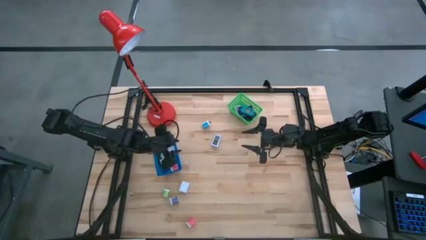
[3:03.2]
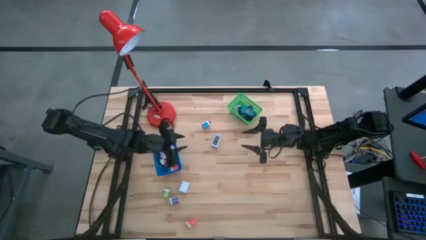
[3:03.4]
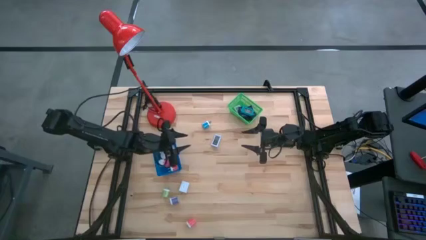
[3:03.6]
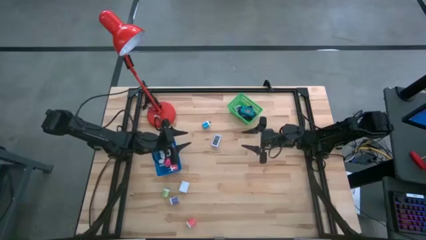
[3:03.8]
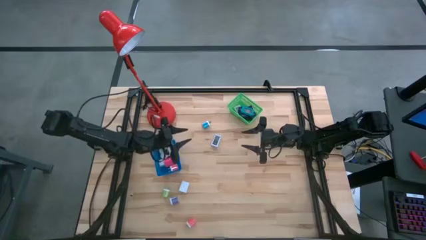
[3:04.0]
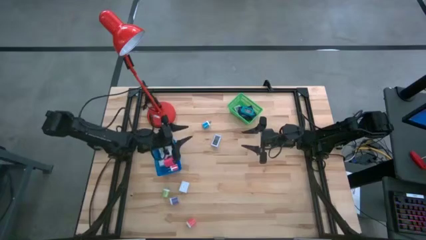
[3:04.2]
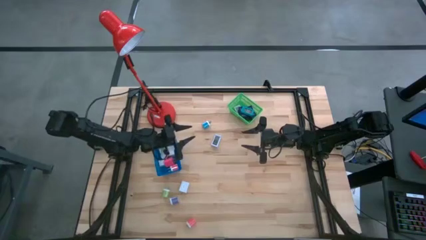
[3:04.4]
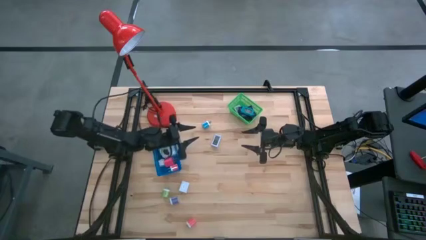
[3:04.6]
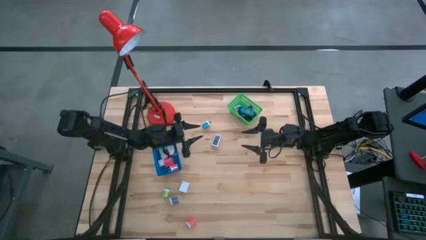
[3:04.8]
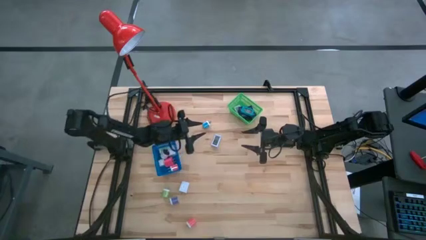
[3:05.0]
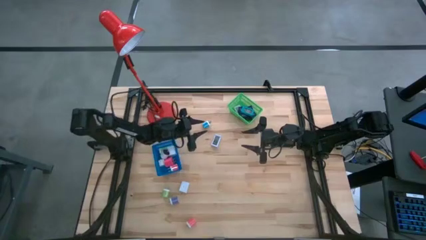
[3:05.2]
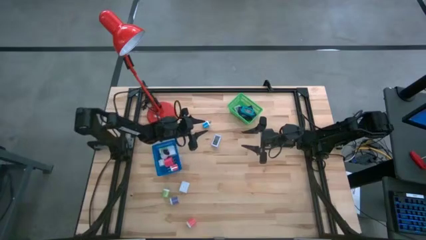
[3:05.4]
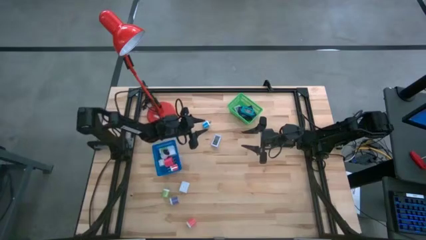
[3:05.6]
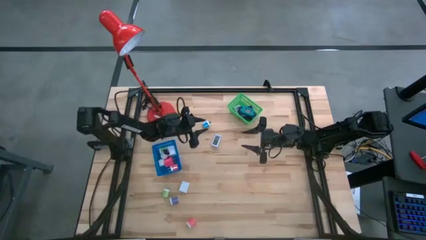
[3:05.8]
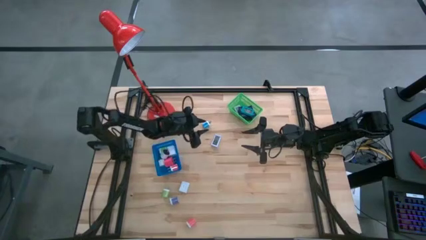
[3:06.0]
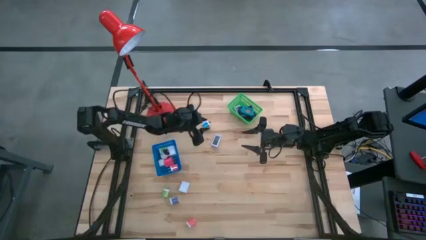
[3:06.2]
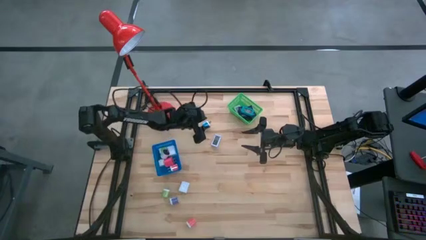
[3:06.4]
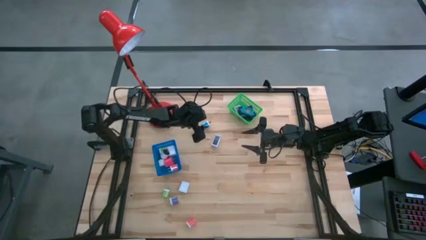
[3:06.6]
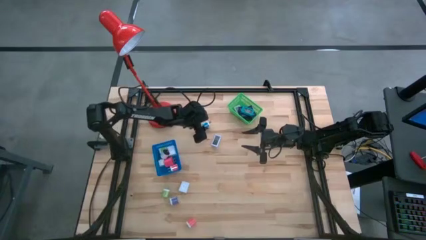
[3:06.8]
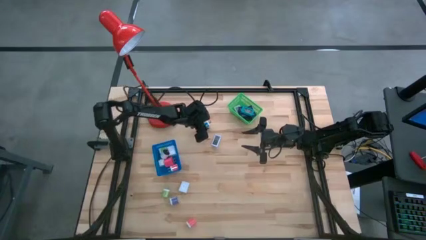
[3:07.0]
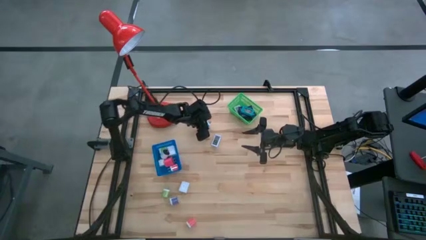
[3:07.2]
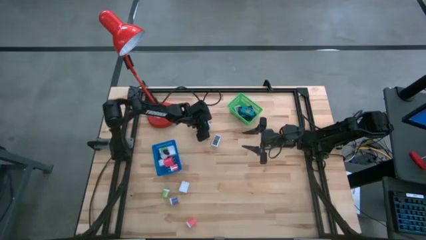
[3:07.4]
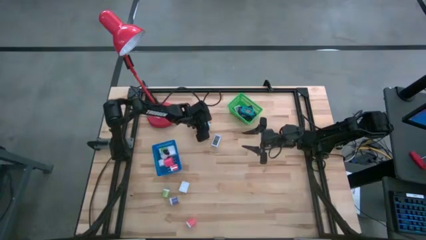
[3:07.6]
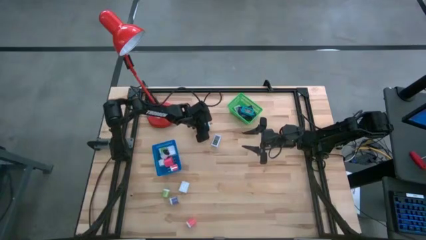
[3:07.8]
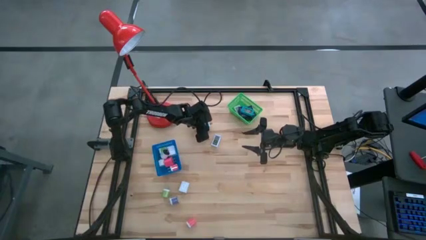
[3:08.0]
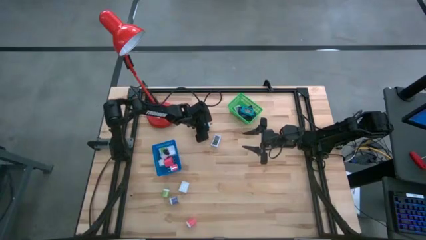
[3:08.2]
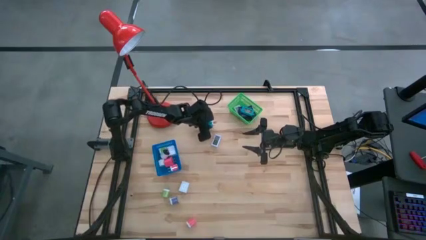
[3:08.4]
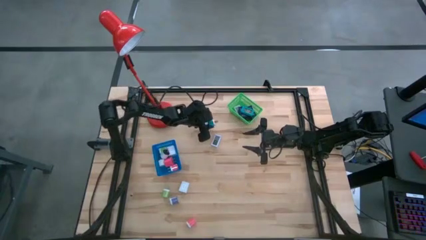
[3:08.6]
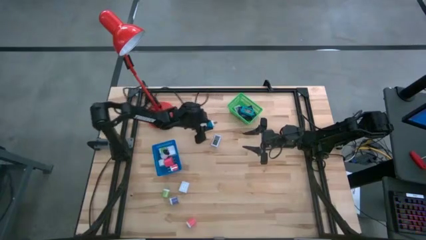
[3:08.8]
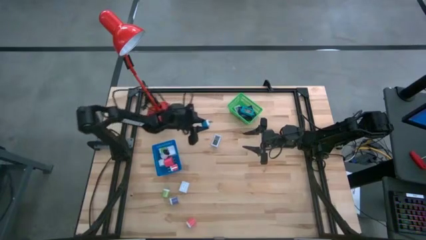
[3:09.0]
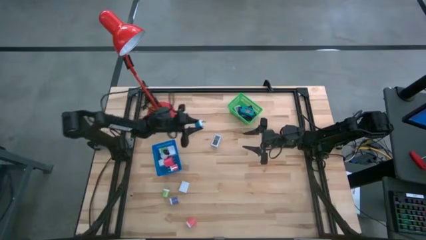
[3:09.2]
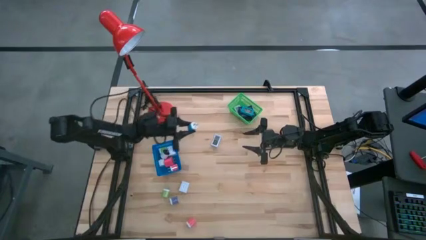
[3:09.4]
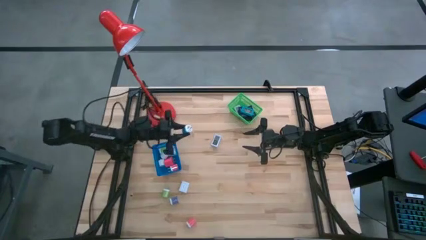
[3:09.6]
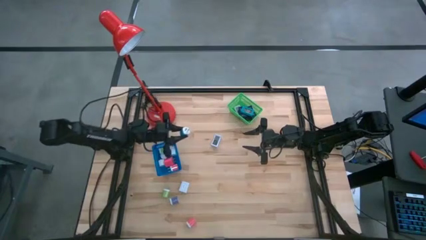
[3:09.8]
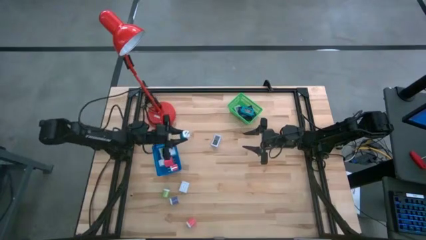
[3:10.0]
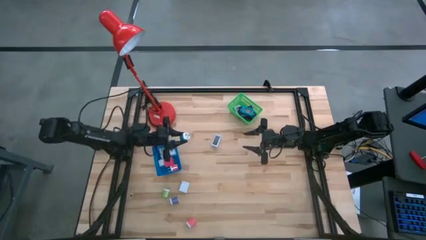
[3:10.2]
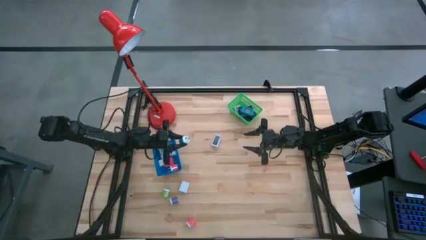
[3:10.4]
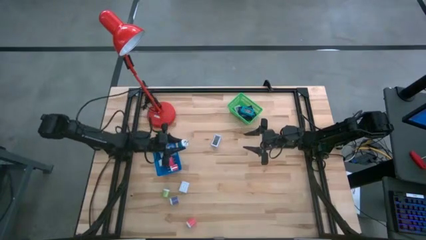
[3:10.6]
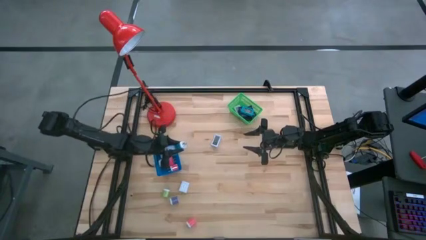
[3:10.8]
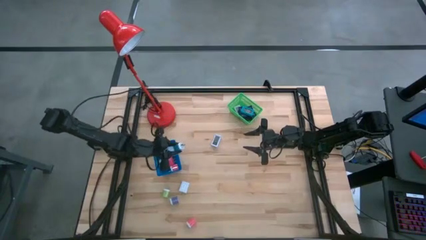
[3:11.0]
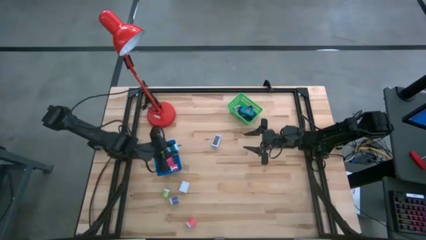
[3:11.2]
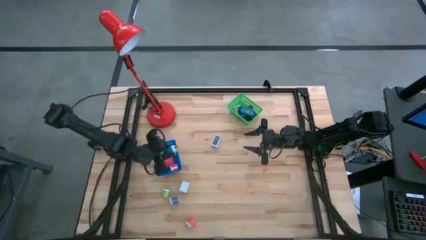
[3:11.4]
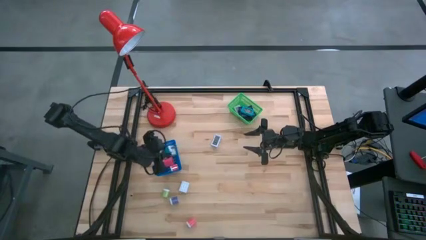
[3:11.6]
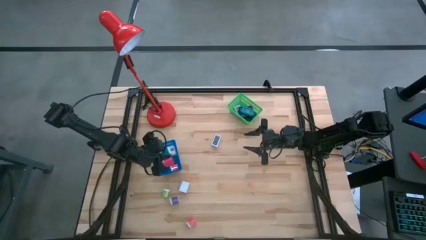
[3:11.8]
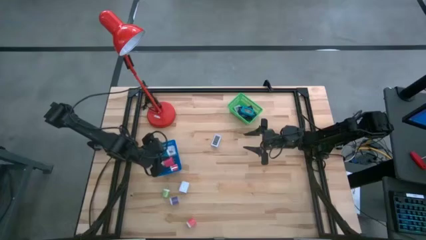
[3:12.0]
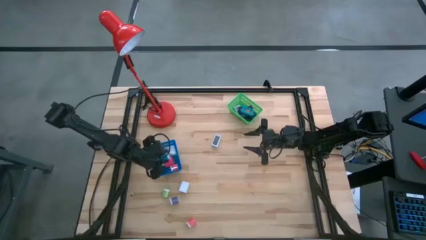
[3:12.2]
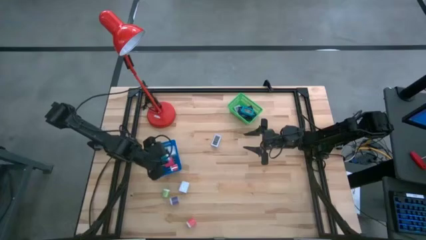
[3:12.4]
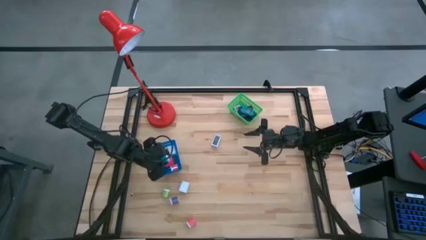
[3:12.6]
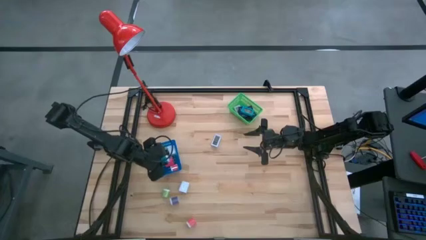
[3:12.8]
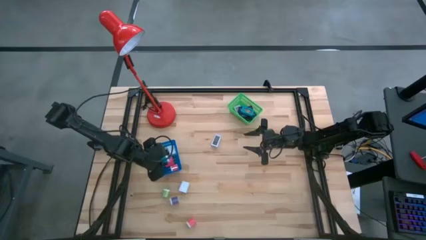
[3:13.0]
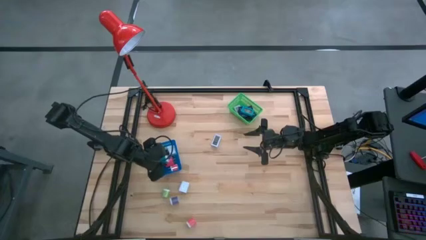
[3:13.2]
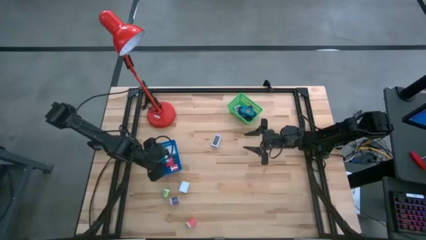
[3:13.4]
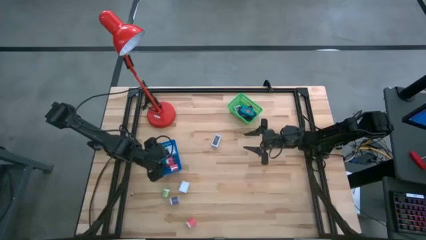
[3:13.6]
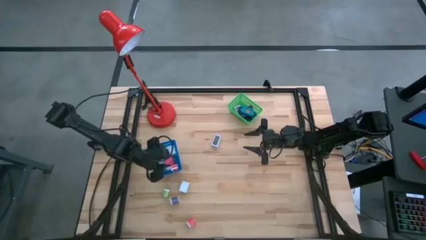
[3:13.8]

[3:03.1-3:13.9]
Task: Pick & Place Office items
Put the light blue charger adapter into the blue basket
